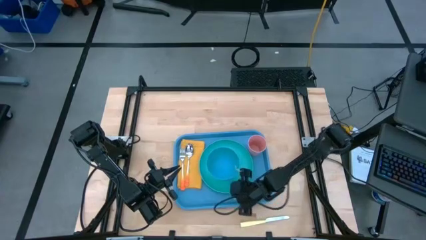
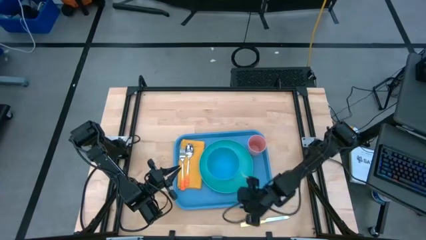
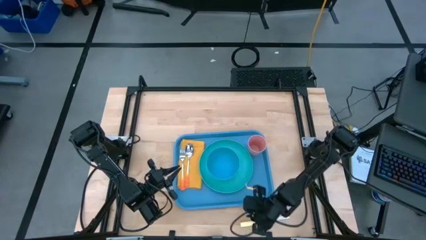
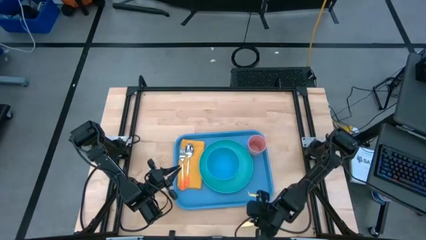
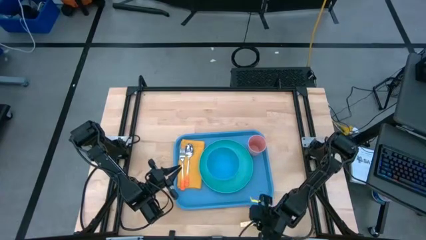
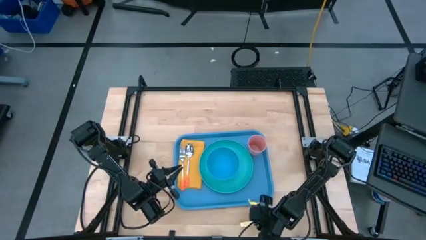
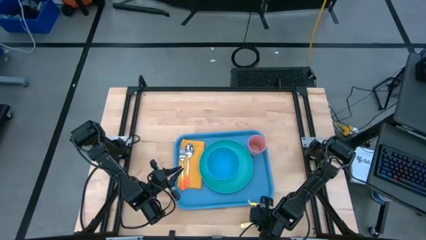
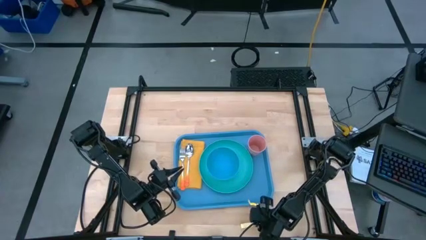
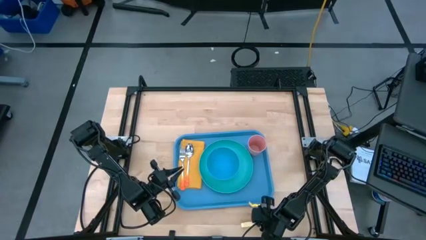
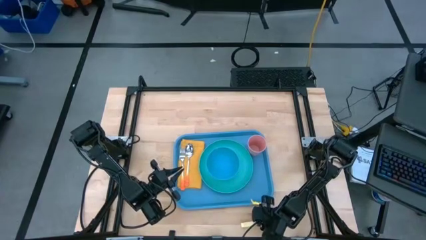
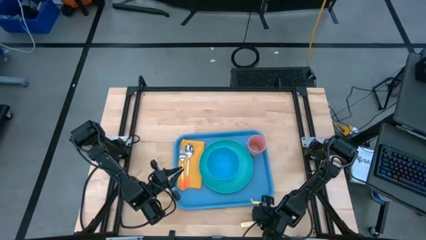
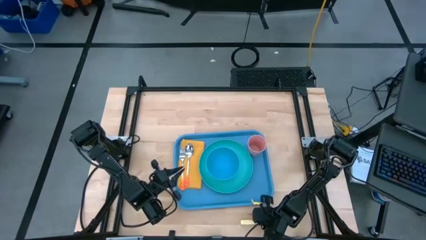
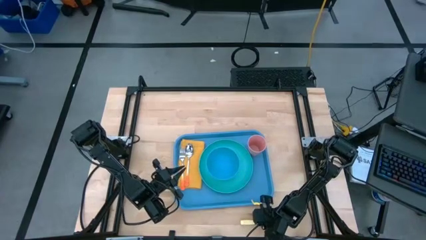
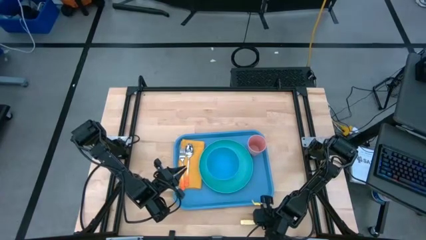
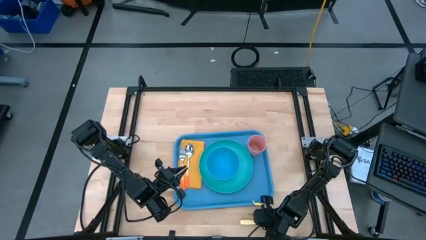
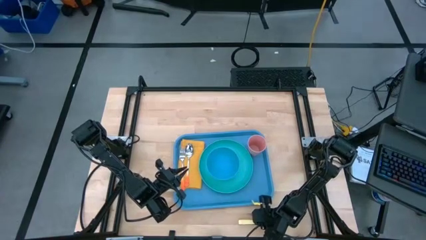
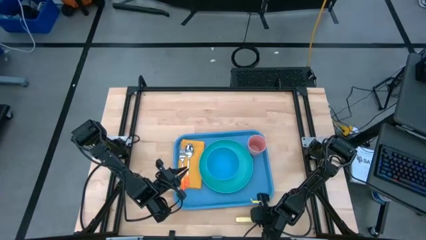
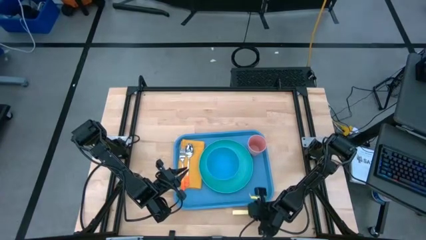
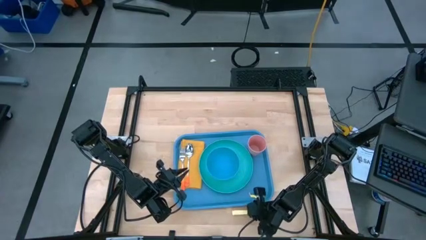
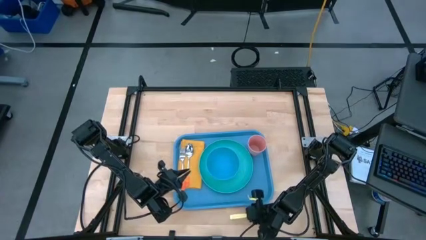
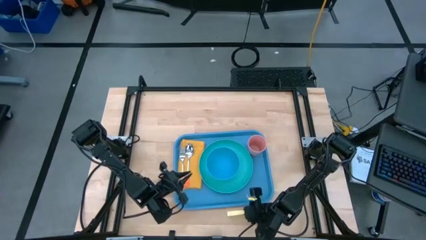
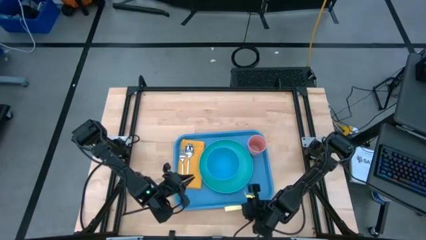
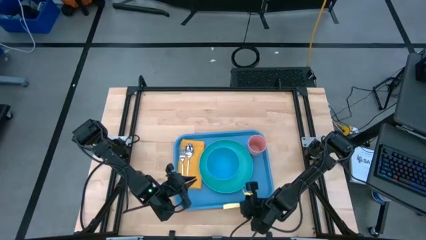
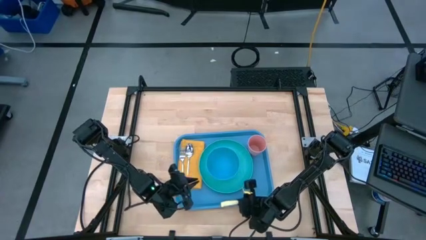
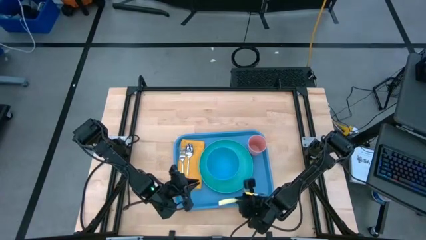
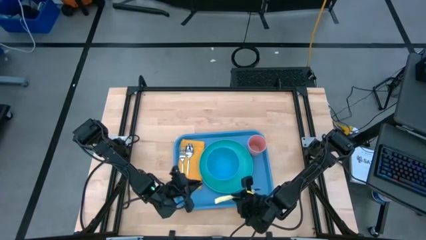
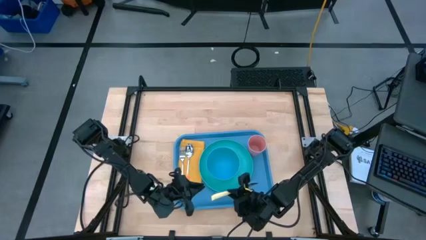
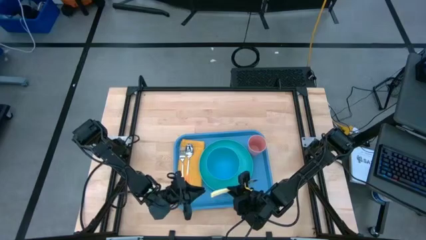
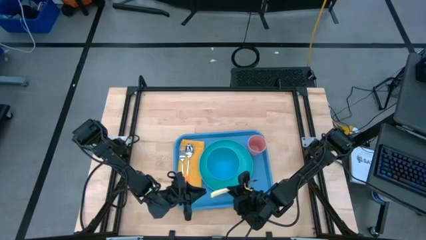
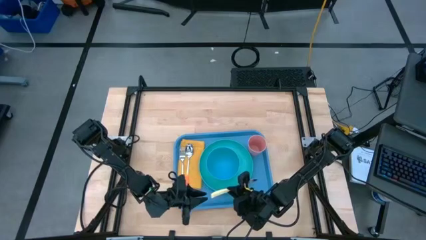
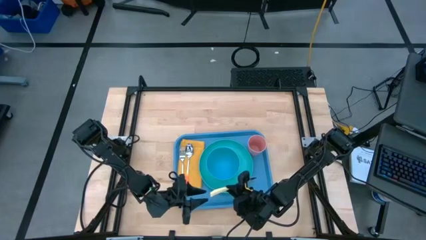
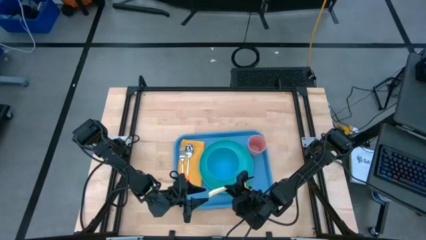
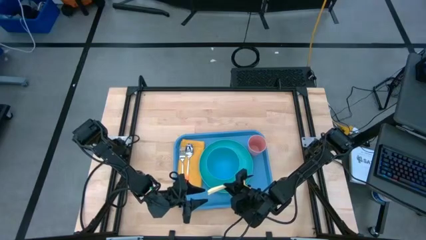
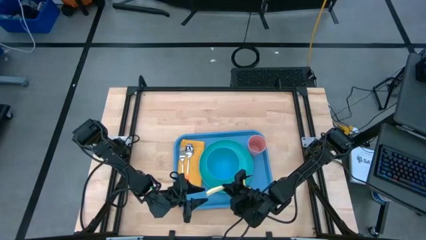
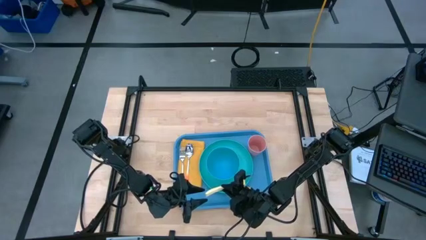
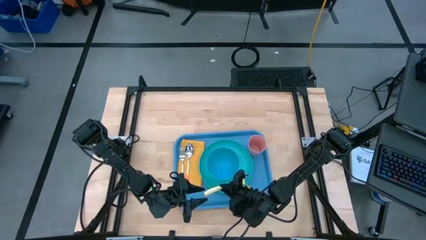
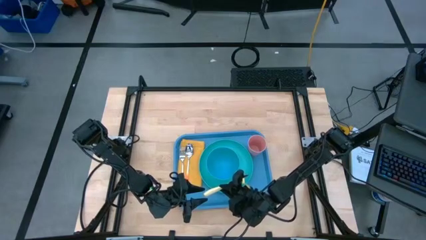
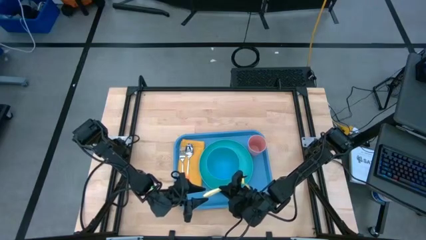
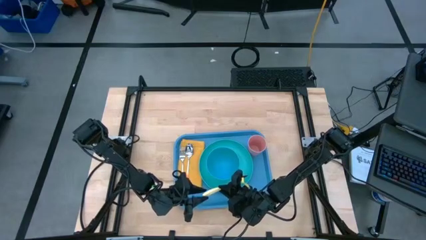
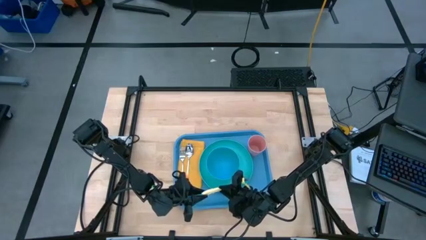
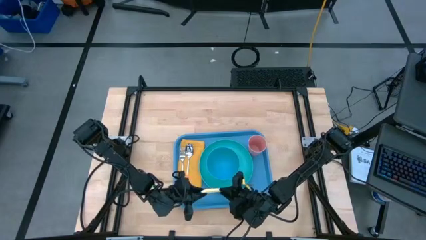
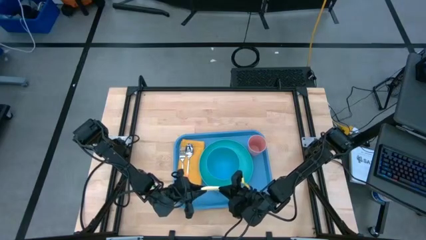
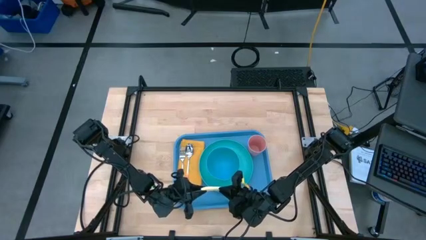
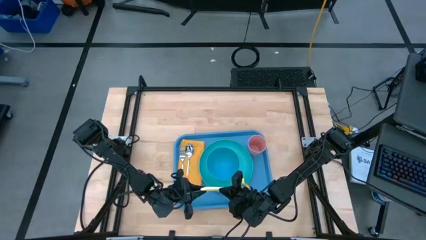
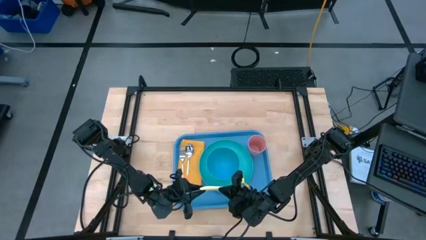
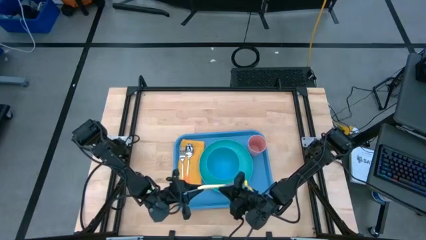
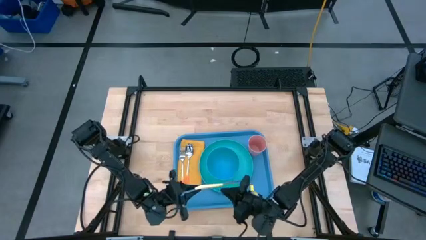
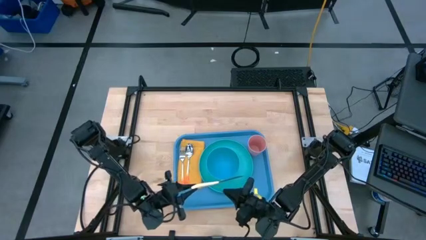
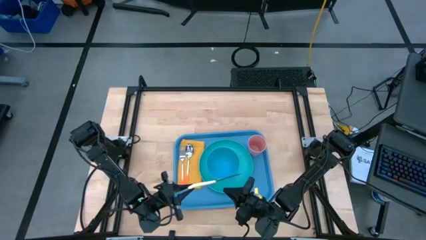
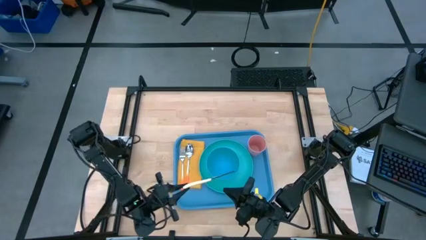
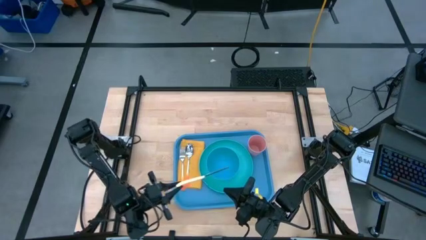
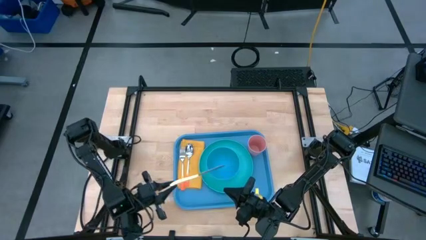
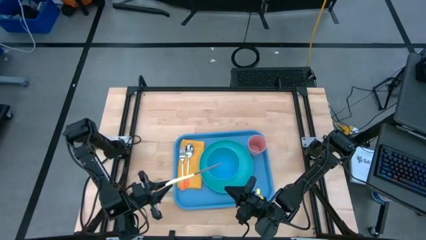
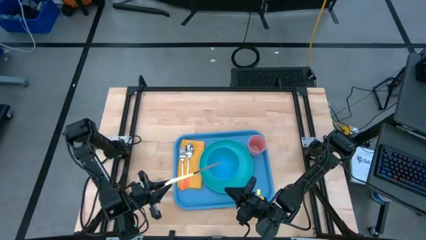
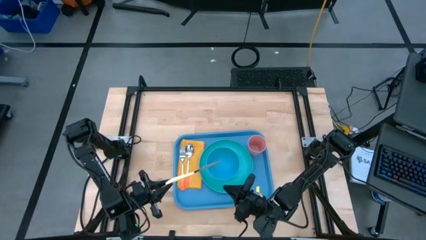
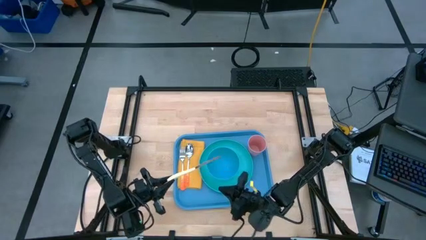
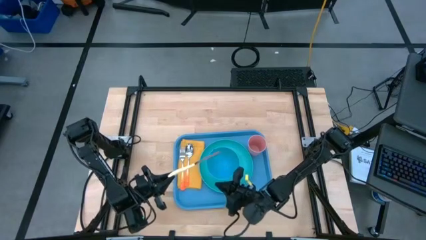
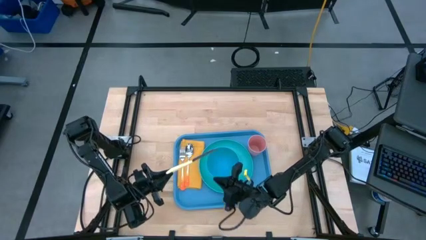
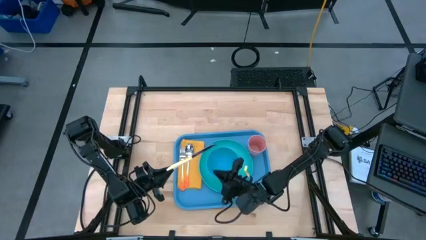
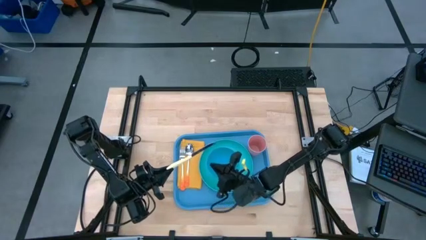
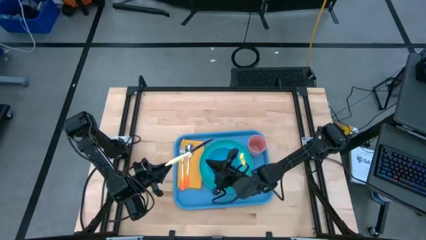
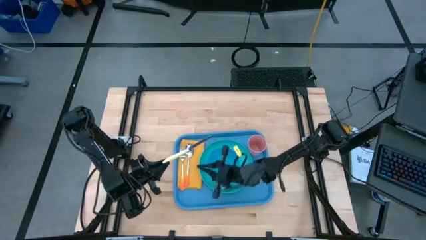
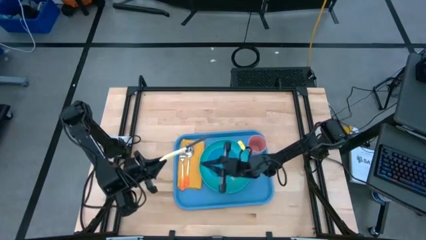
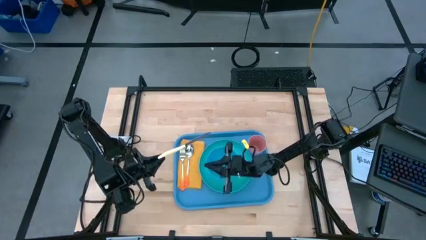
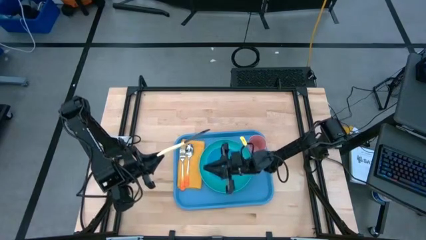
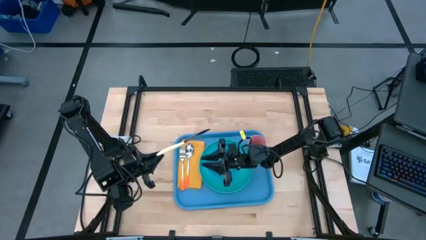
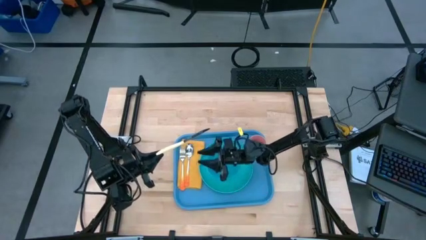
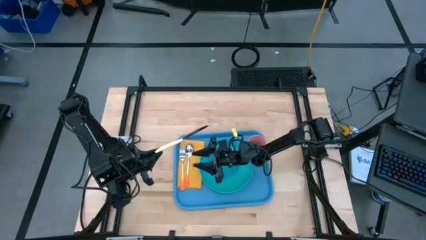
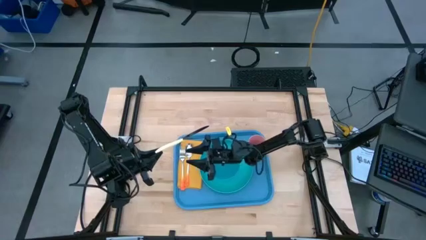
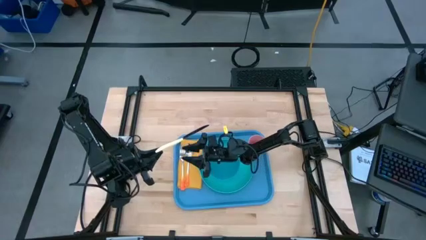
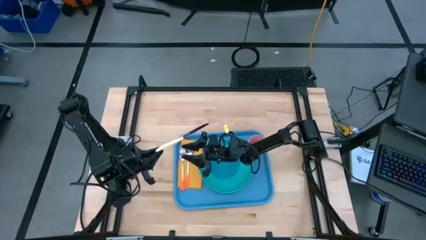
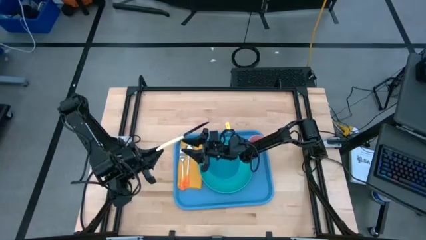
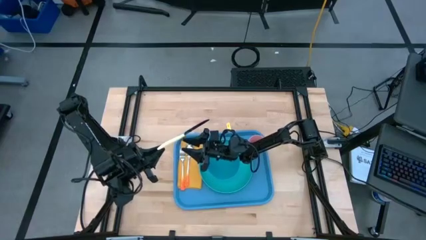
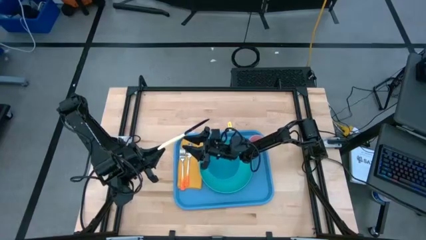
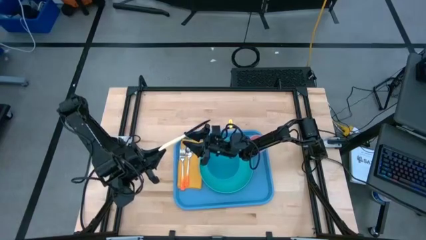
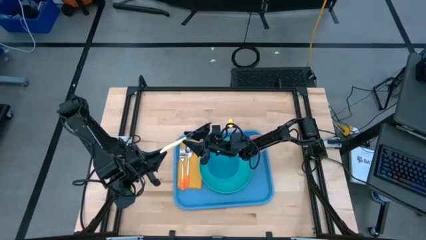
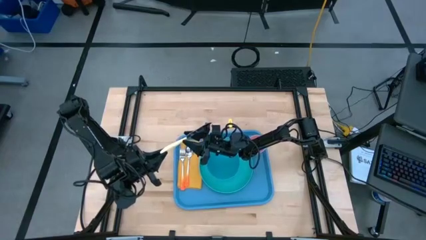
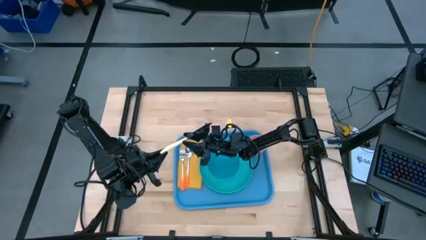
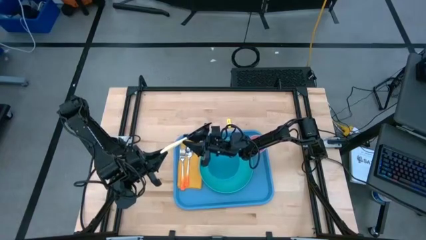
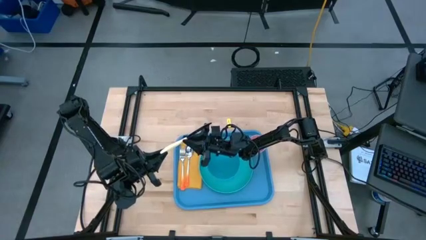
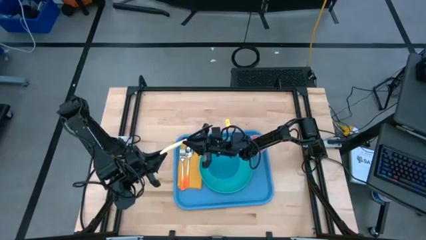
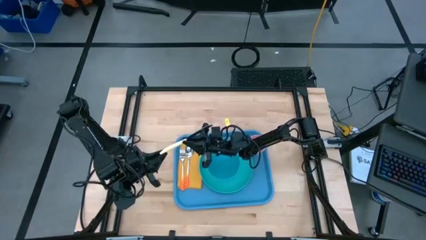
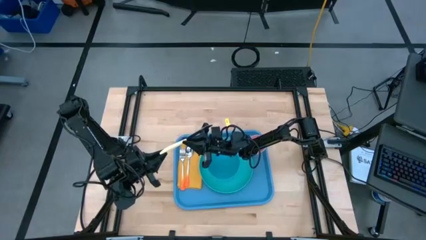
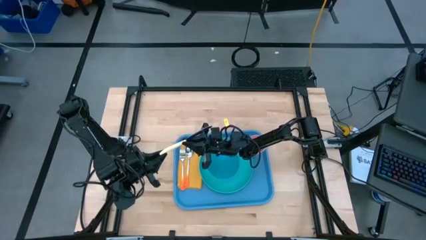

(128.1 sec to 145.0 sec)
Task: Set up tray
Put the yellow knife to the right of the orange spoon on the yellow napkin
